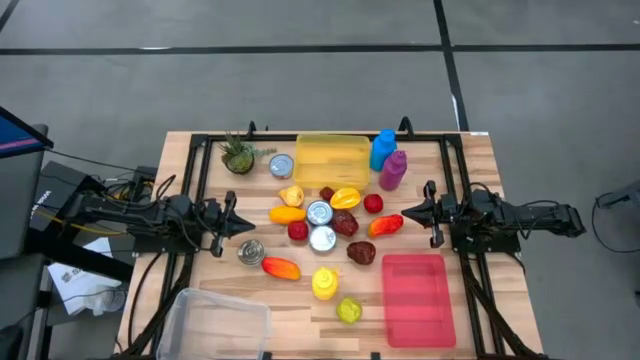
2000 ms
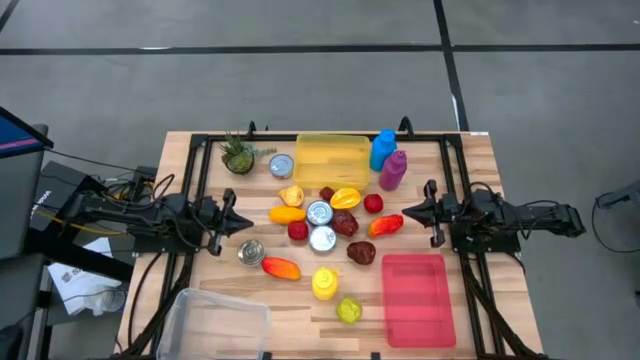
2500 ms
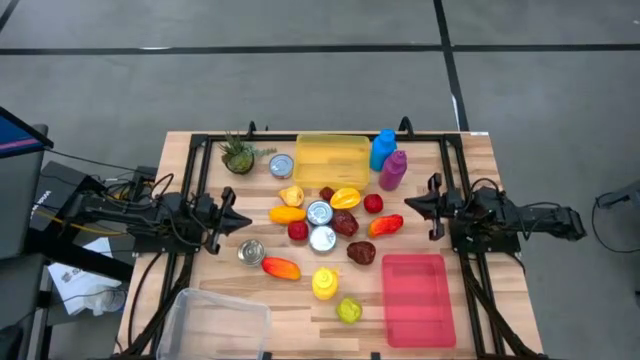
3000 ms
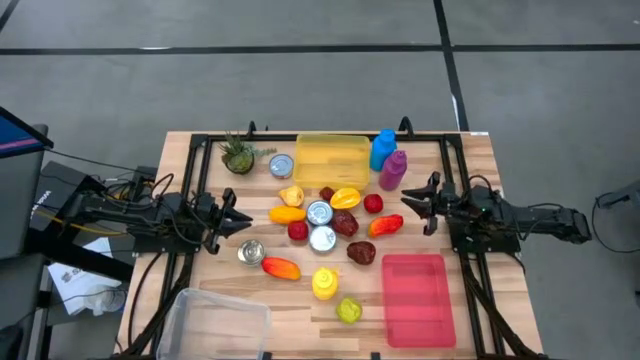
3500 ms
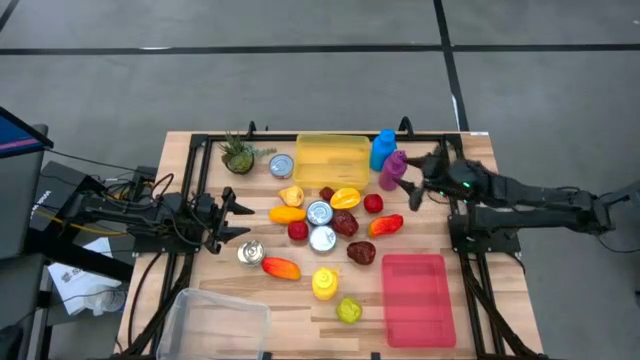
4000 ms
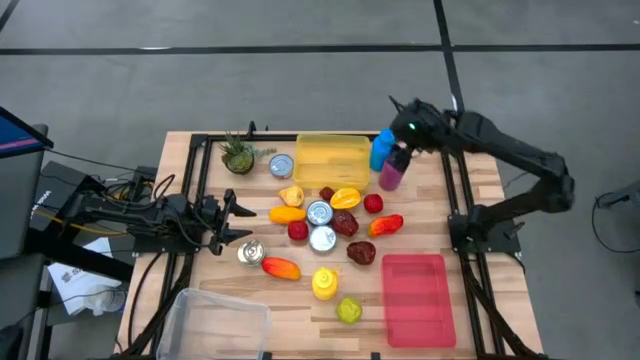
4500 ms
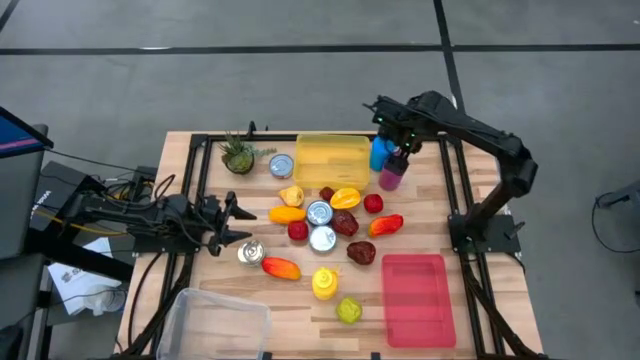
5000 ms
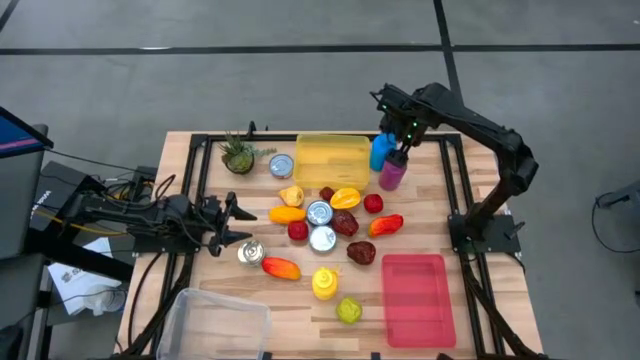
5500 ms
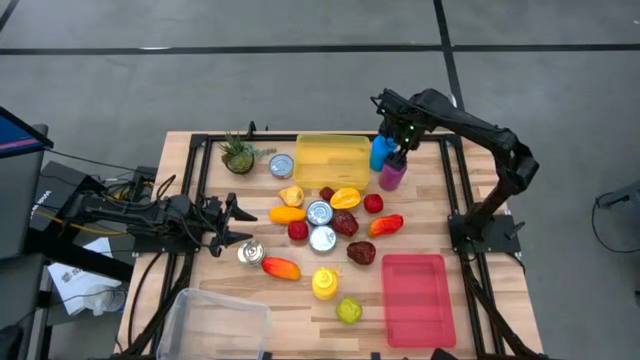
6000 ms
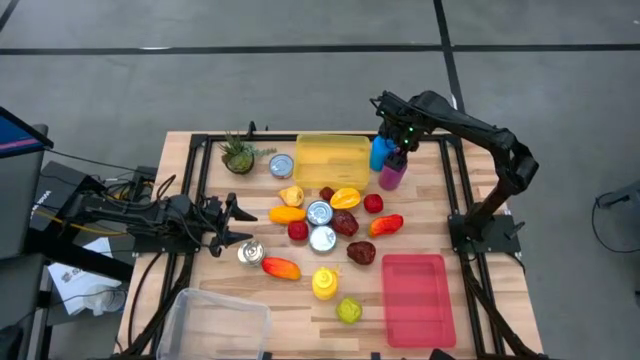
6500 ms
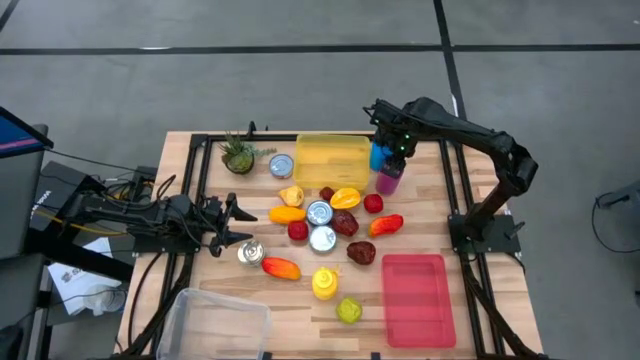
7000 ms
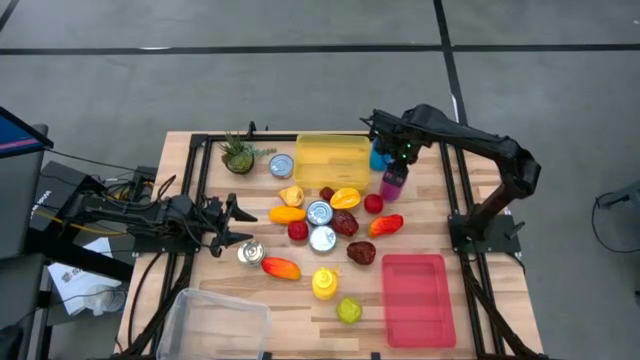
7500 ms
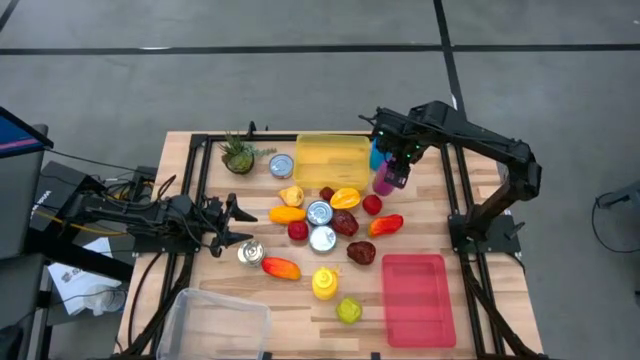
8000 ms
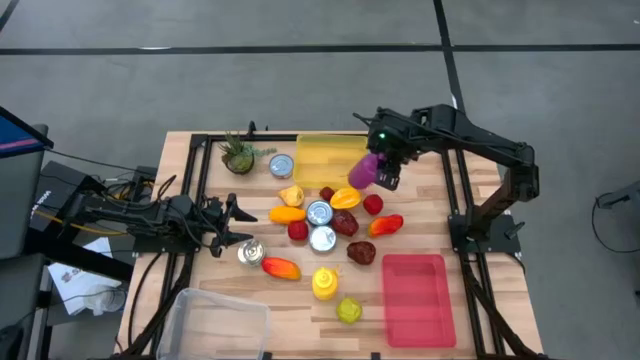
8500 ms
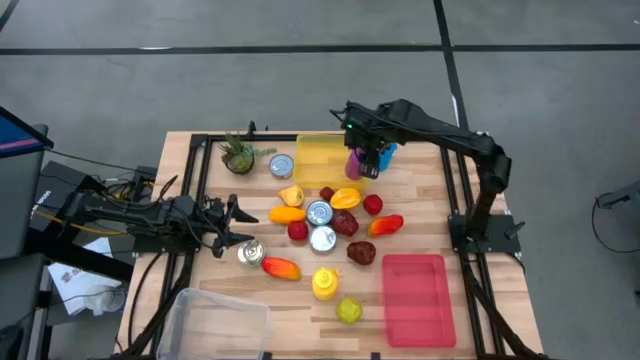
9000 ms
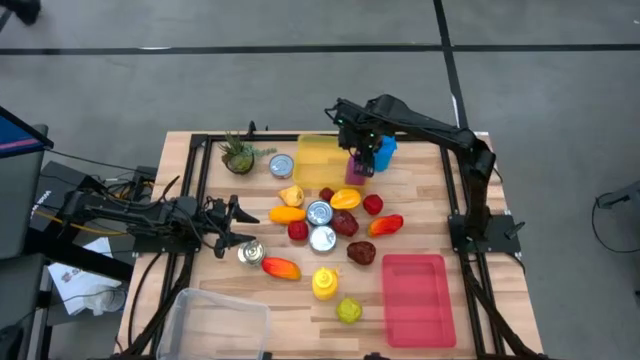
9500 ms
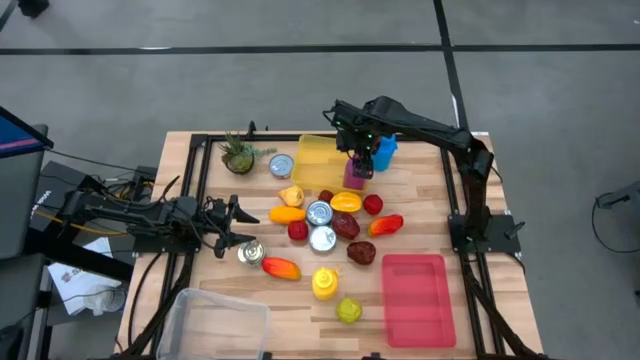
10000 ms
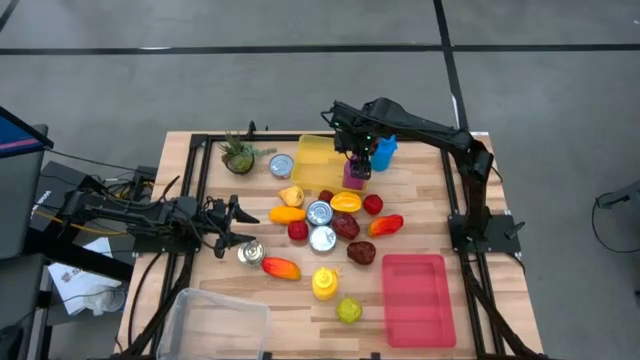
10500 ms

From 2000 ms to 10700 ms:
Task: Pick & Place Food Item
Put the purple tumbler into the yellow bin

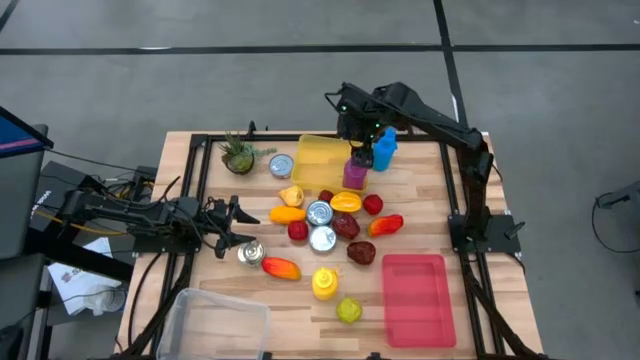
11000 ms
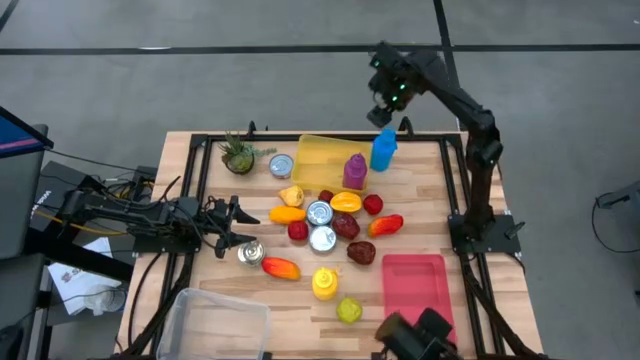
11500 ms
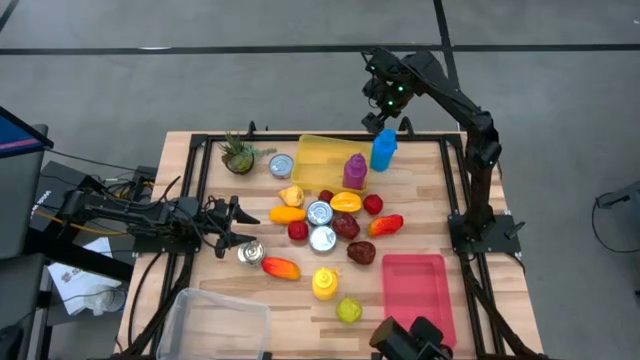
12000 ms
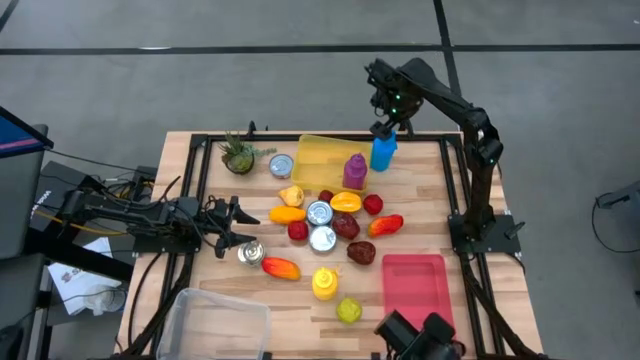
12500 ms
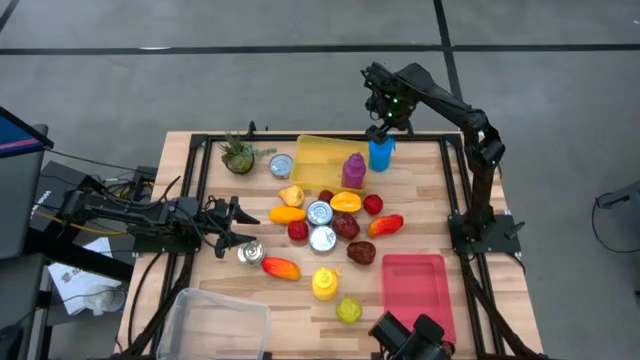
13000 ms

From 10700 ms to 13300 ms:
Put the blue tumbler into the yellow bin

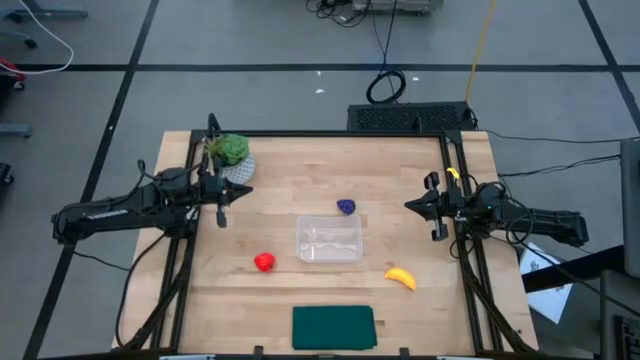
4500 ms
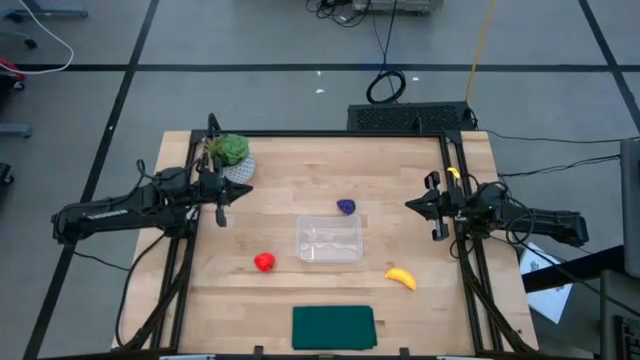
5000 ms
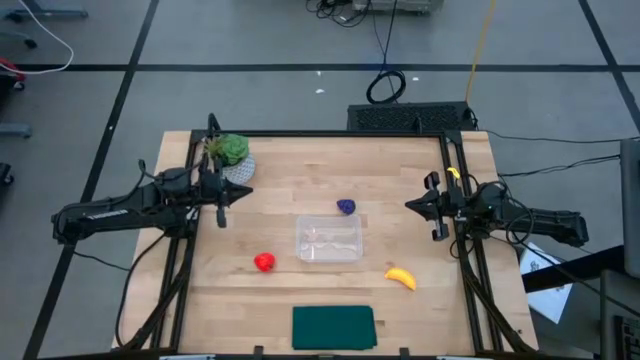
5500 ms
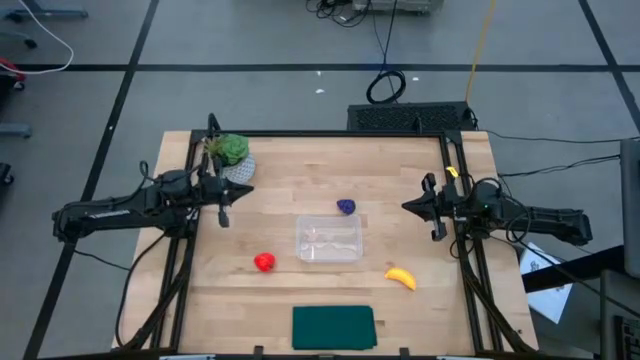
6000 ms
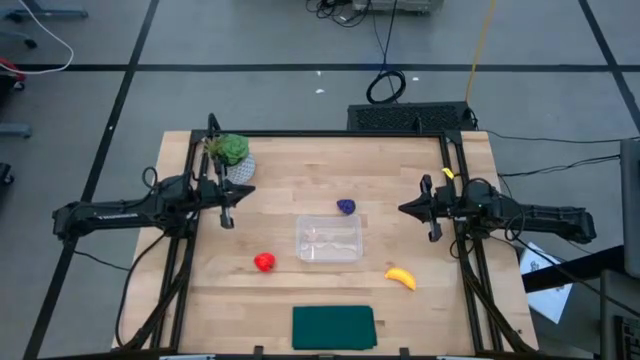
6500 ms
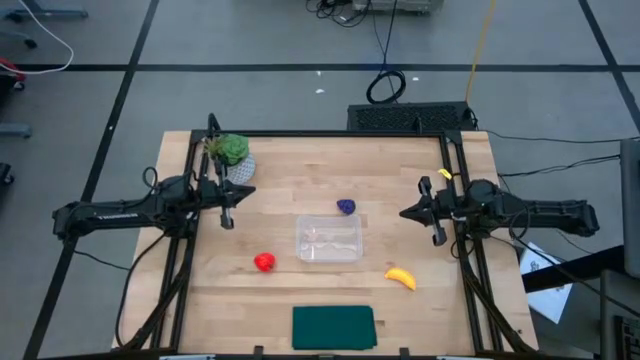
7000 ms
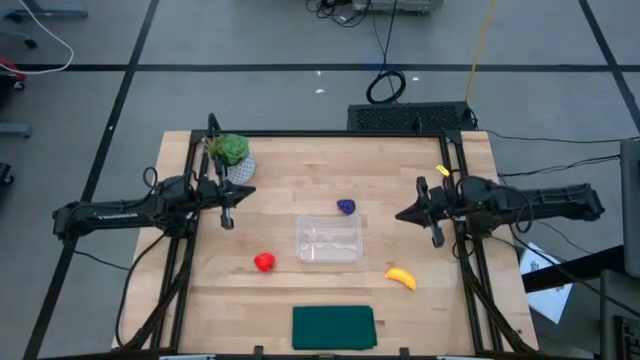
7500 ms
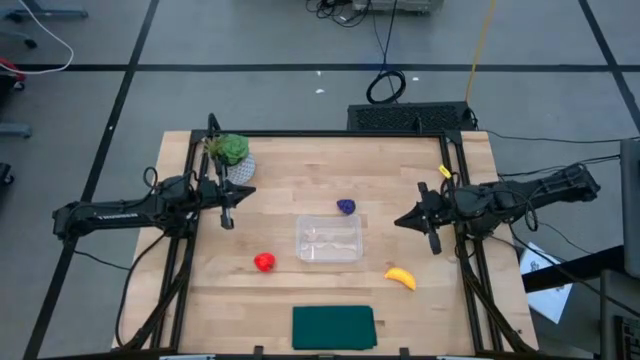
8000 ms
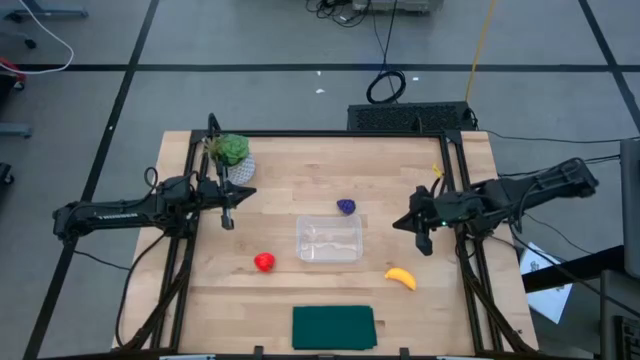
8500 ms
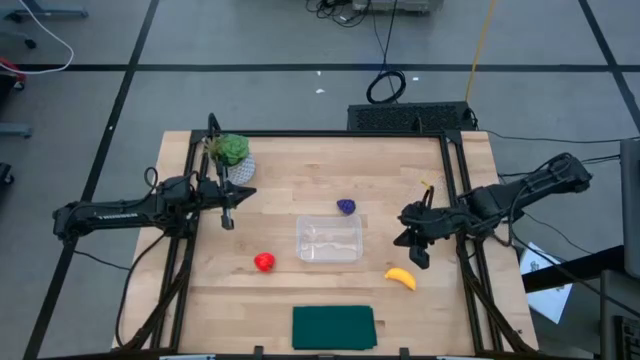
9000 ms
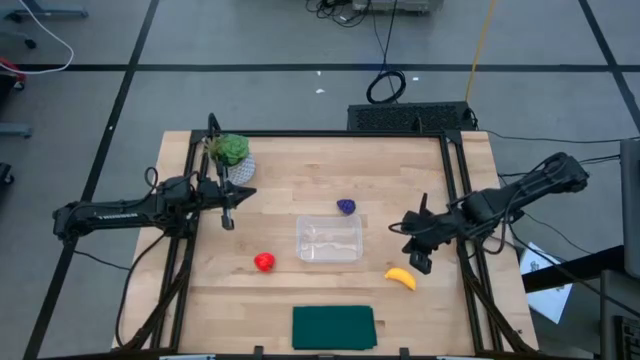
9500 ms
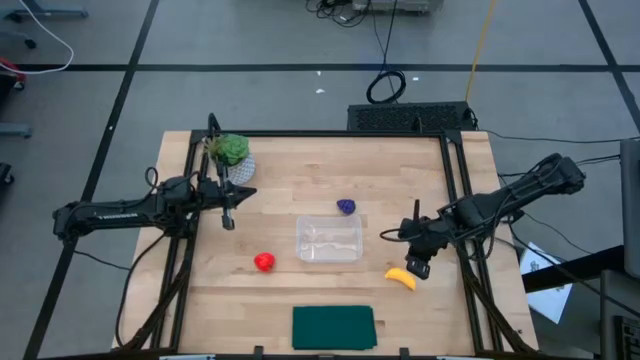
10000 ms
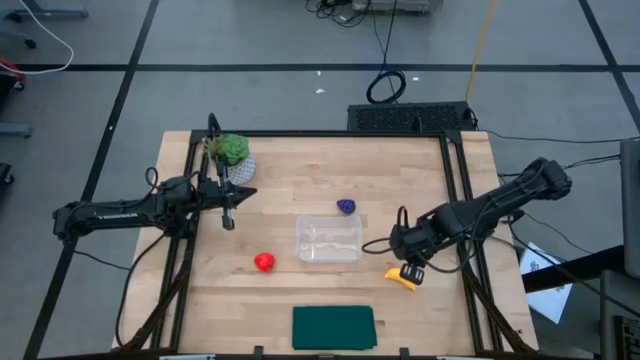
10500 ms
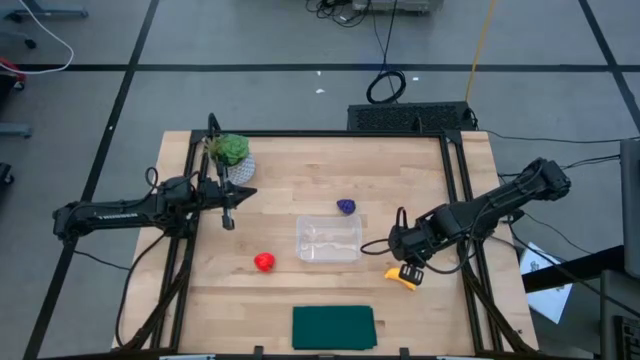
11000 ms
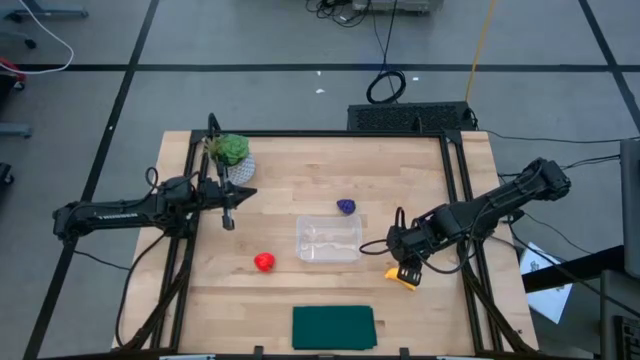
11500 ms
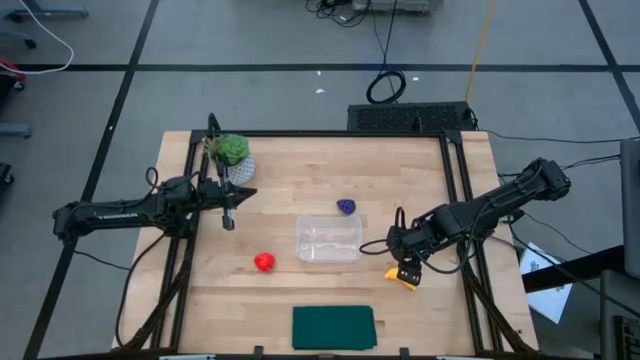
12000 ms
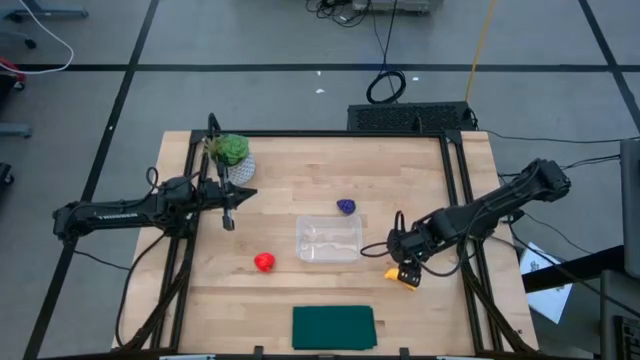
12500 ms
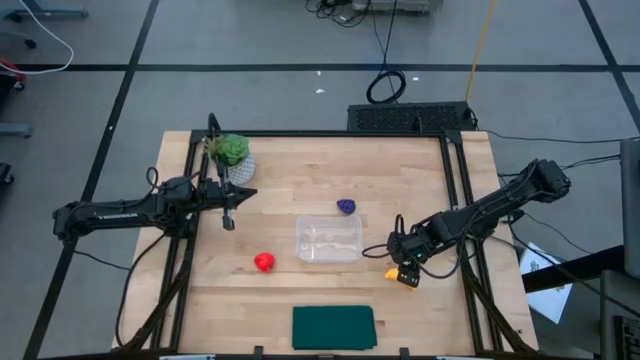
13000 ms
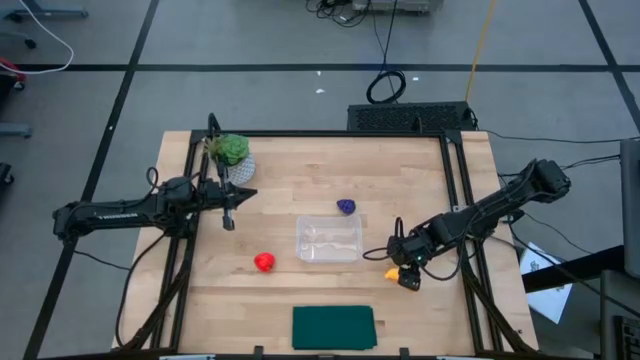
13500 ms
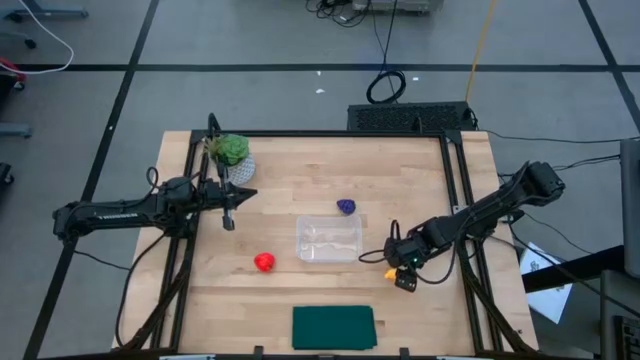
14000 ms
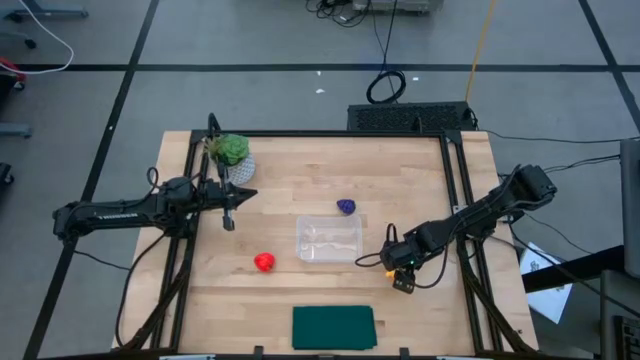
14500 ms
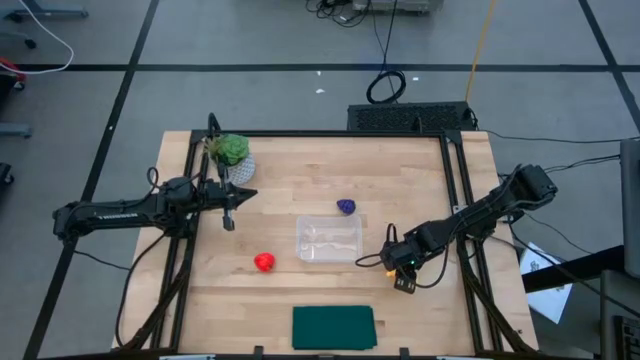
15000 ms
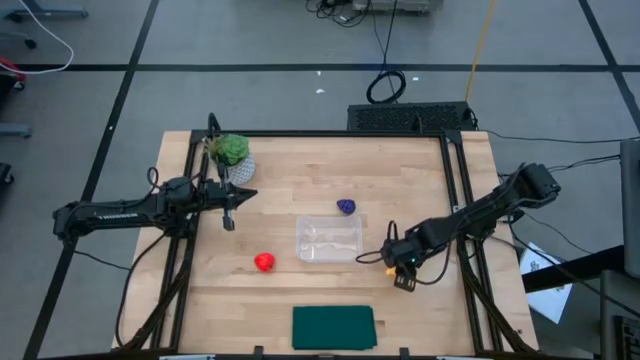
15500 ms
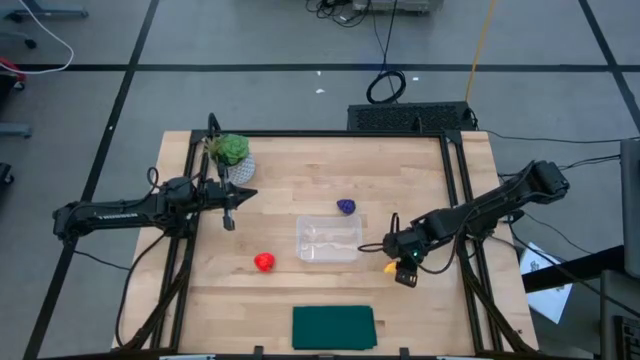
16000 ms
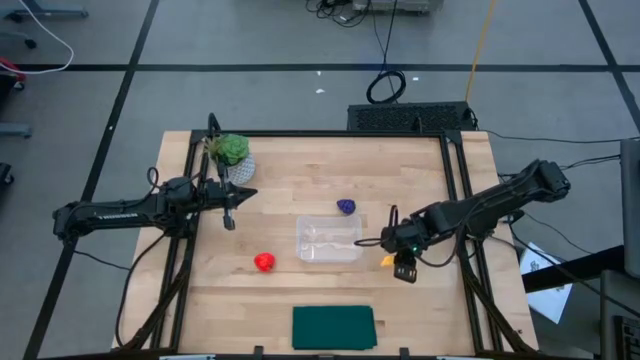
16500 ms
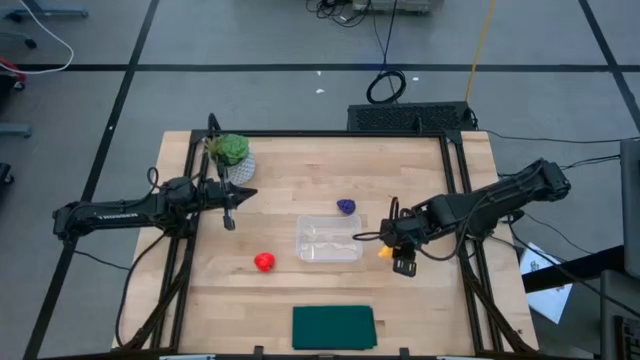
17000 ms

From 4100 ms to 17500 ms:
Task: Pick and placing Produce into tupperware
Put the banana into the transparent bin
